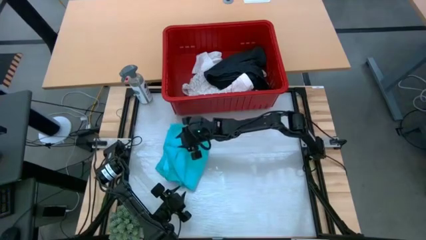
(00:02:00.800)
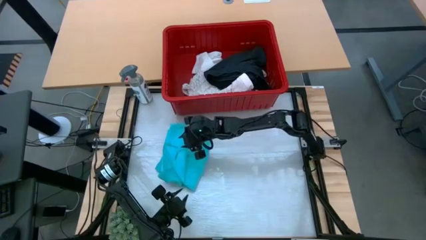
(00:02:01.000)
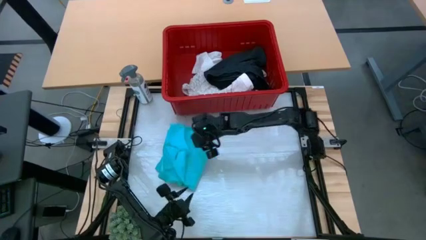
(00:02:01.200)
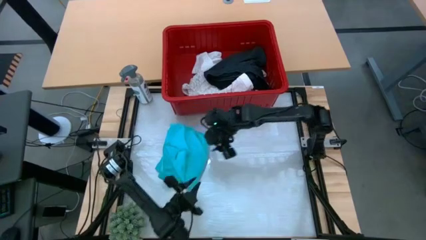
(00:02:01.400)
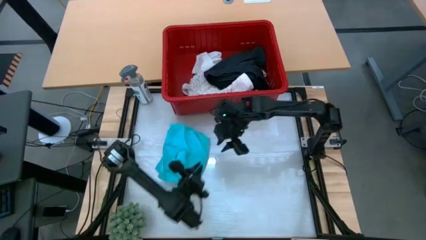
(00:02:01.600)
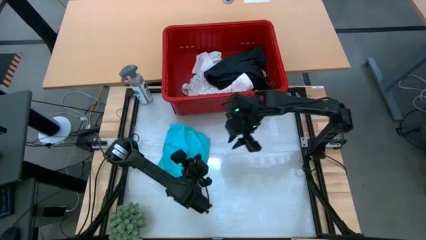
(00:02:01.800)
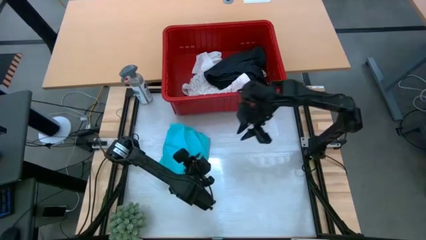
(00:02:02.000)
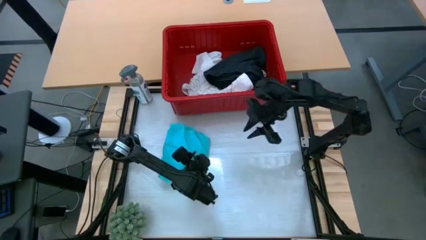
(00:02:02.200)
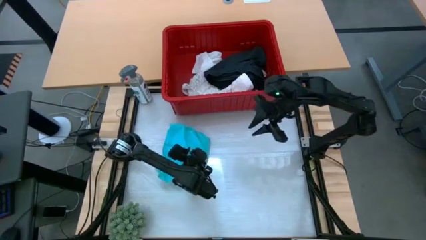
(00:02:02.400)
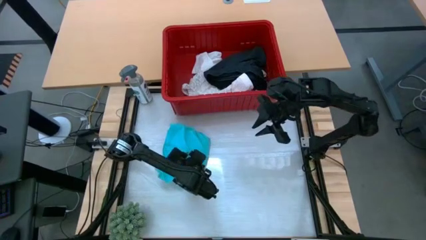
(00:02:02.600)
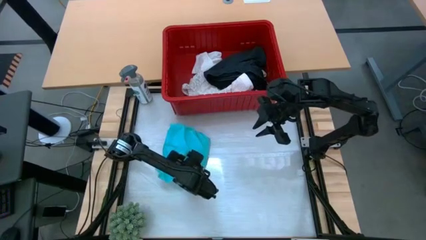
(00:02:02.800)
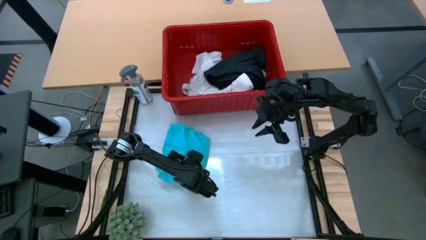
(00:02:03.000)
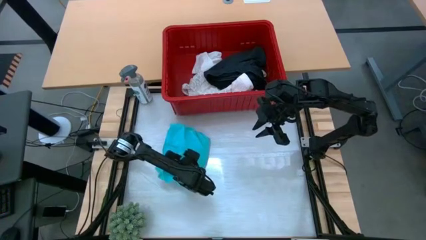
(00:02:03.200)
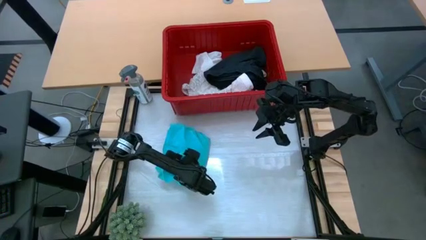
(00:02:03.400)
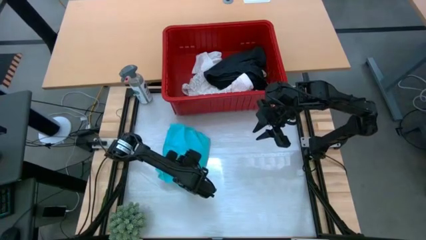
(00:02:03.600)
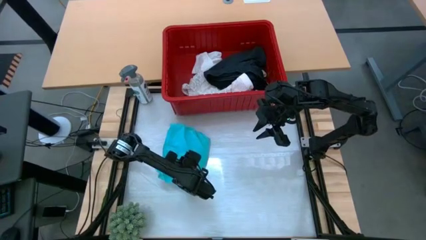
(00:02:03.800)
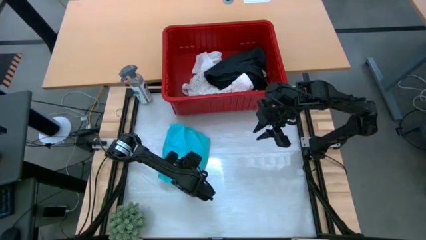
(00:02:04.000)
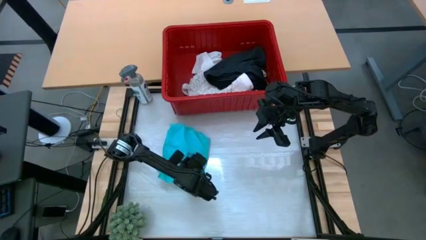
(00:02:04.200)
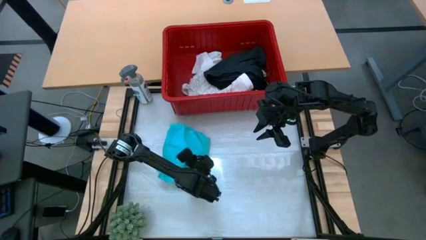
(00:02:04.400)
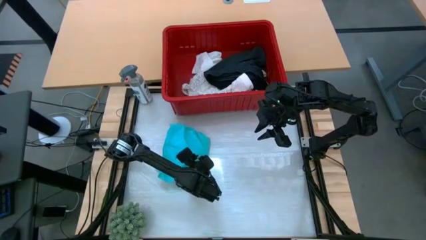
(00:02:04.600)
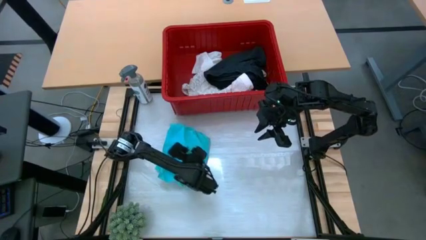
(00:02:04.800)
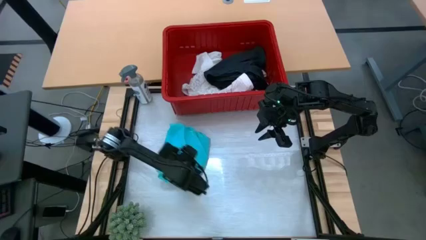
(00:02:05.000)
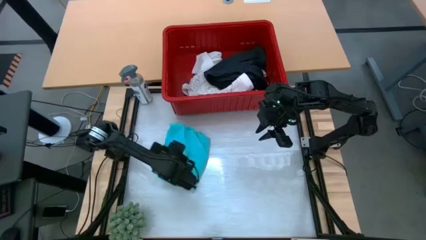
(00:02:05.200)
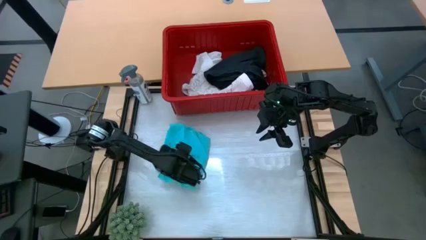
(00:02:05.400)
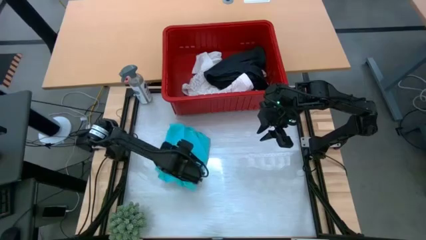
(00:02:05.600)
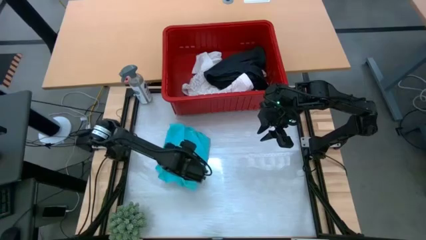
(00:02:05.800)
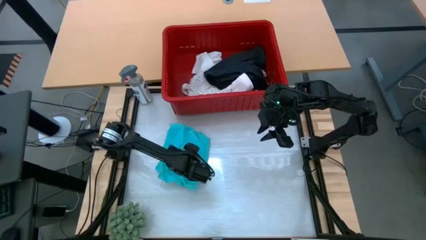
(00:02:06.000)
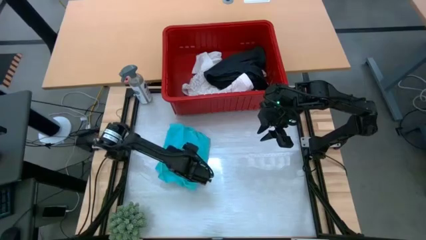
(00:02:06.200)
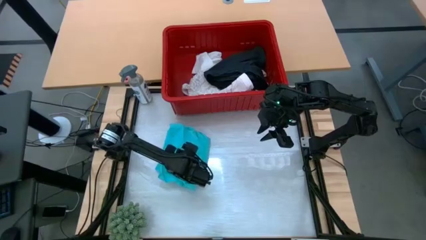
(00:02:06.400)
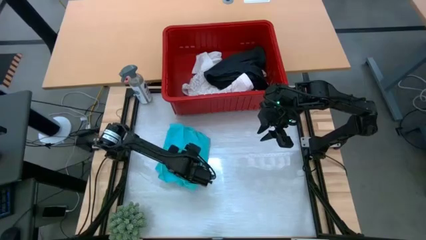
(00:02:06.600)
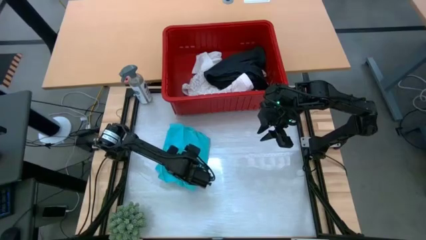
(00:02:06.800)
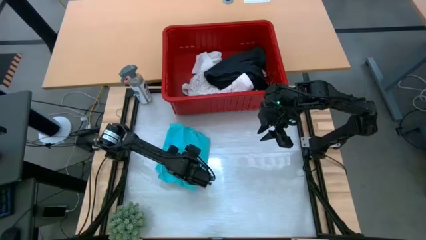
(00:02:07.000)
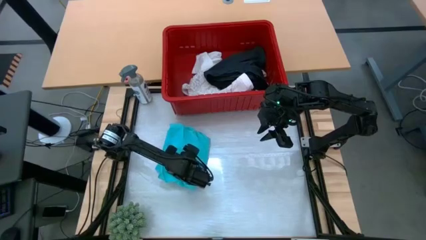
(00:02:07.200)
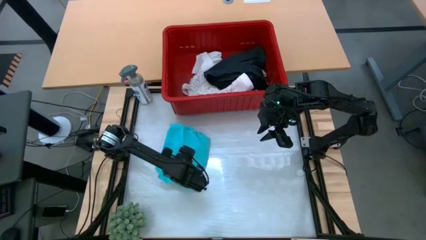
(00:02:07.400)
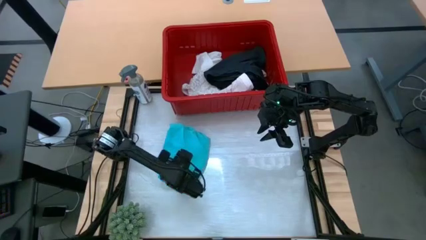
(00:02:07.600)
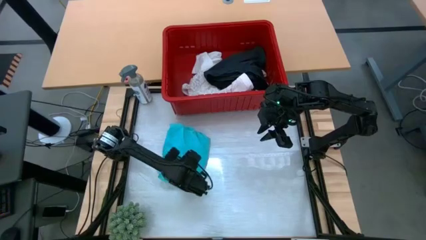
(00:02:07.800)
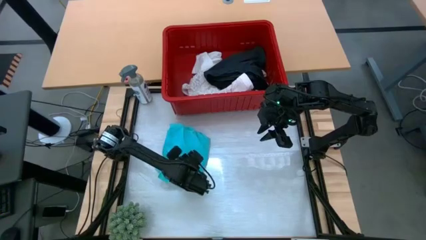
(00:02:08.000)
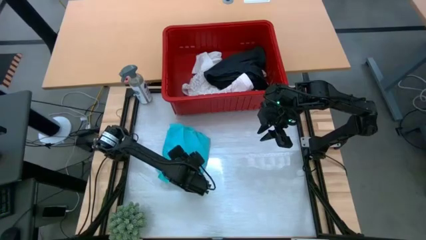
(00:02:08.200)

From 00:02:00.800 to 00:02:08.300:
Task: Fold laundry
Fold the light blue shorts

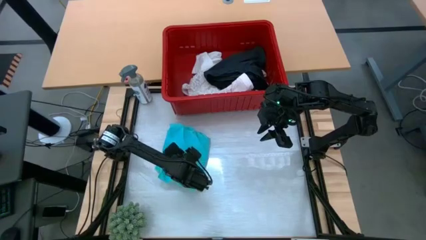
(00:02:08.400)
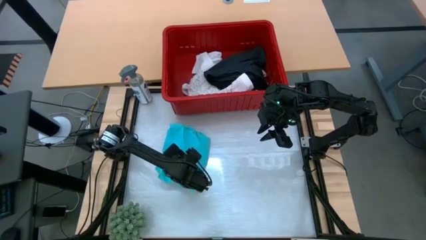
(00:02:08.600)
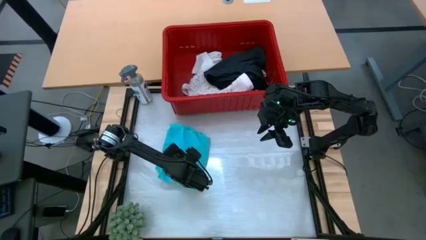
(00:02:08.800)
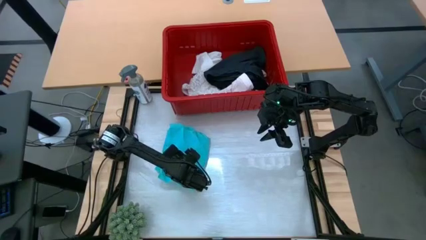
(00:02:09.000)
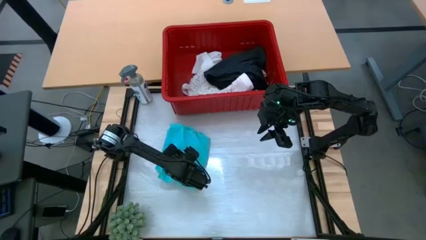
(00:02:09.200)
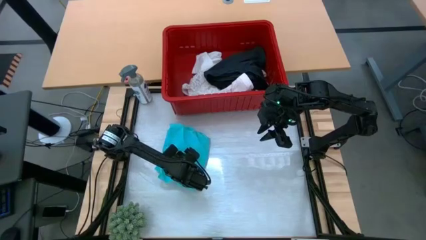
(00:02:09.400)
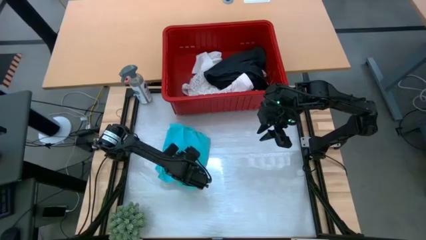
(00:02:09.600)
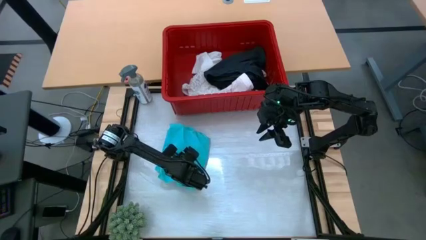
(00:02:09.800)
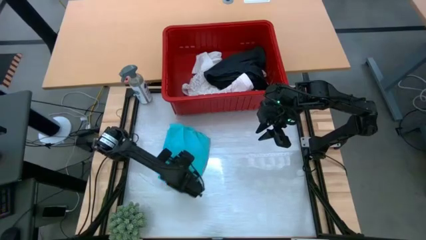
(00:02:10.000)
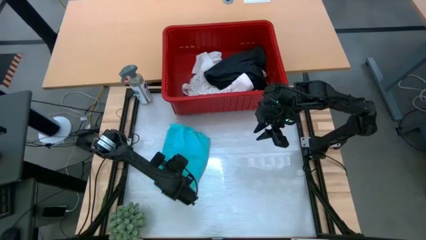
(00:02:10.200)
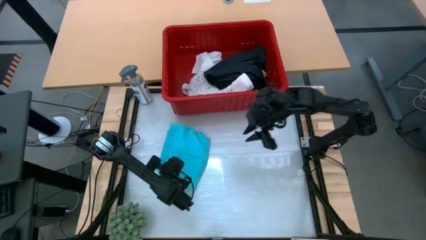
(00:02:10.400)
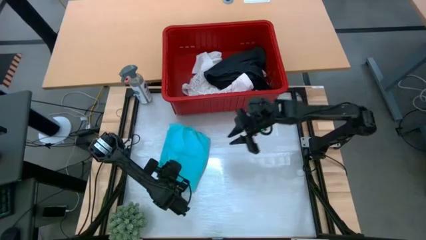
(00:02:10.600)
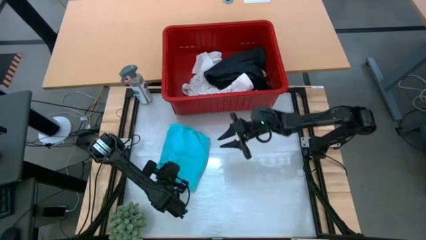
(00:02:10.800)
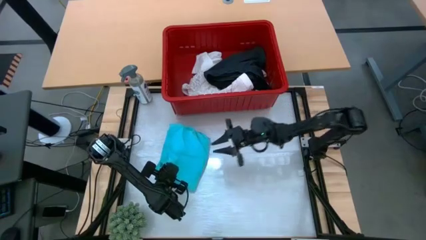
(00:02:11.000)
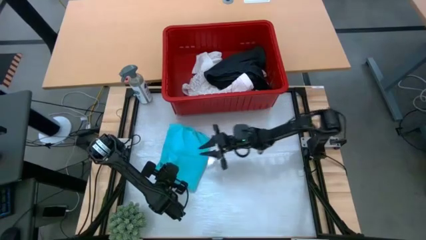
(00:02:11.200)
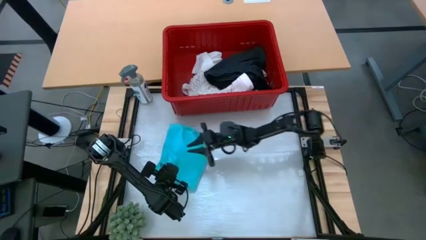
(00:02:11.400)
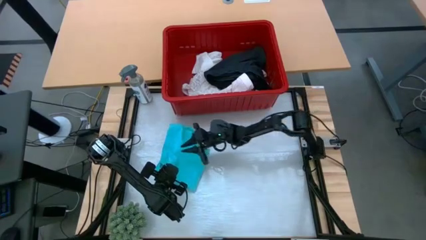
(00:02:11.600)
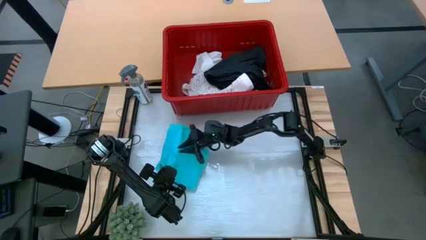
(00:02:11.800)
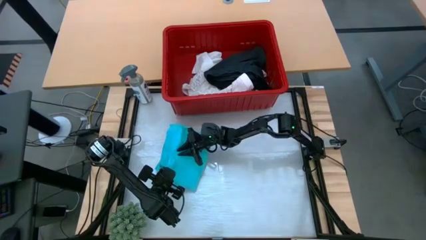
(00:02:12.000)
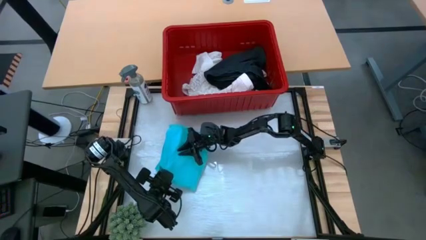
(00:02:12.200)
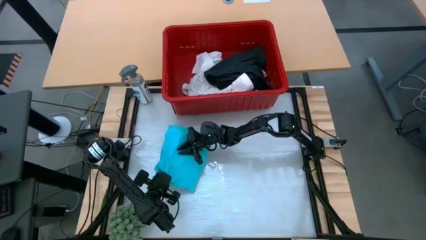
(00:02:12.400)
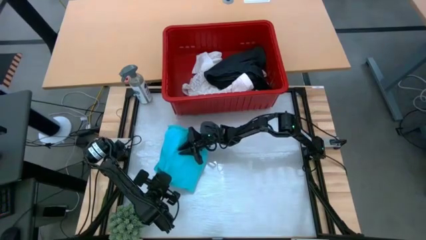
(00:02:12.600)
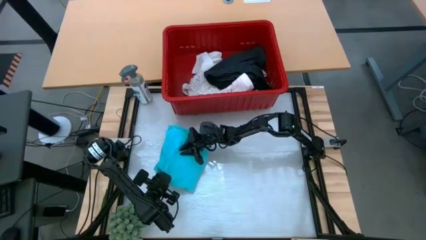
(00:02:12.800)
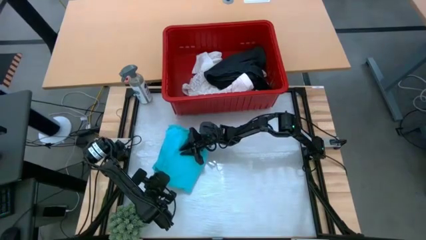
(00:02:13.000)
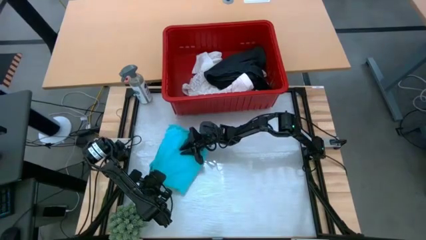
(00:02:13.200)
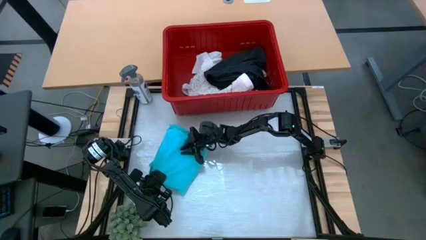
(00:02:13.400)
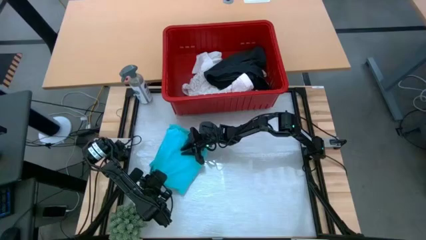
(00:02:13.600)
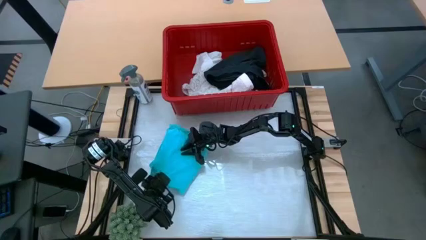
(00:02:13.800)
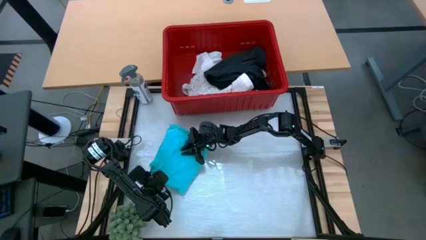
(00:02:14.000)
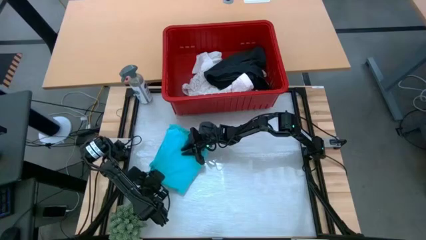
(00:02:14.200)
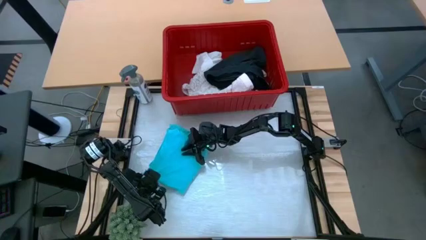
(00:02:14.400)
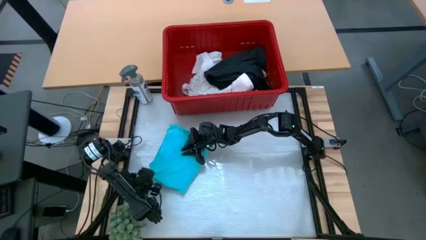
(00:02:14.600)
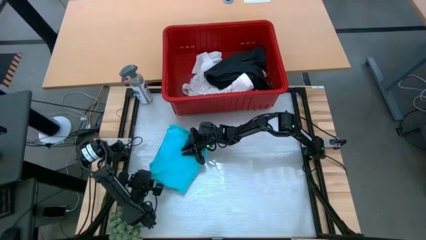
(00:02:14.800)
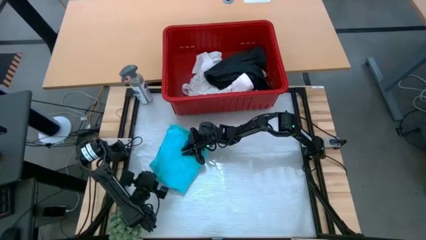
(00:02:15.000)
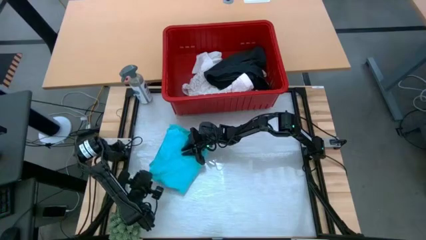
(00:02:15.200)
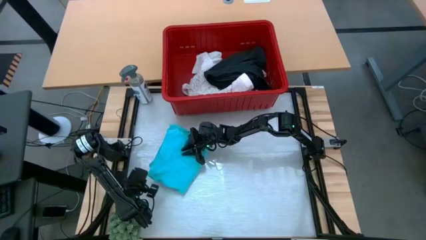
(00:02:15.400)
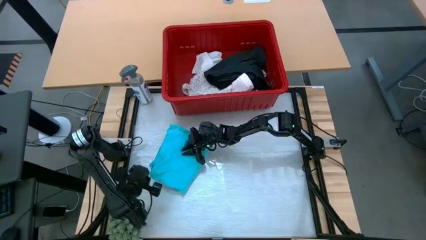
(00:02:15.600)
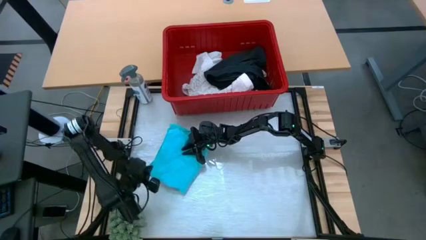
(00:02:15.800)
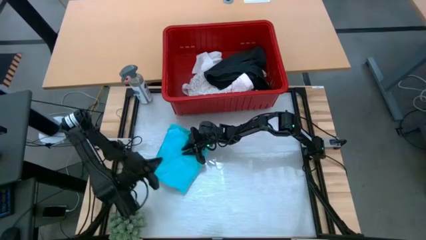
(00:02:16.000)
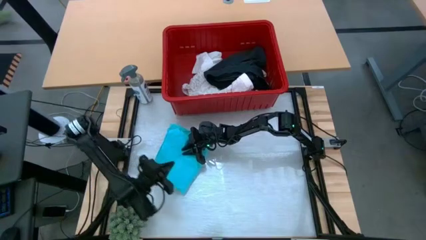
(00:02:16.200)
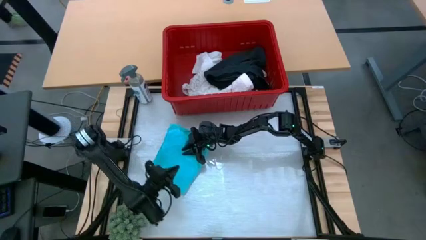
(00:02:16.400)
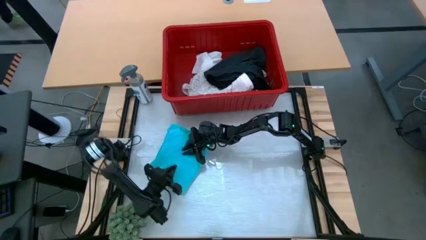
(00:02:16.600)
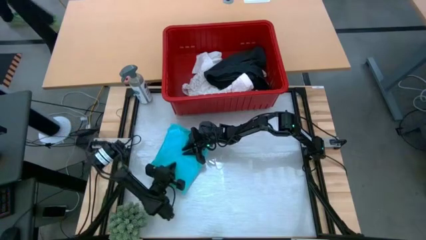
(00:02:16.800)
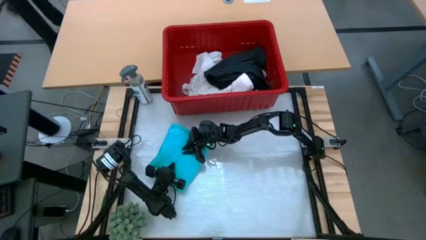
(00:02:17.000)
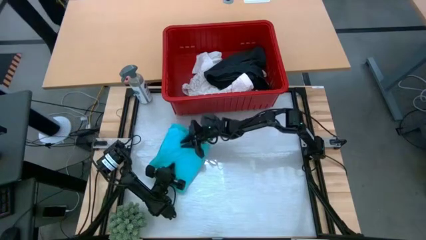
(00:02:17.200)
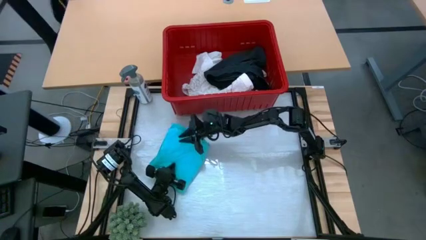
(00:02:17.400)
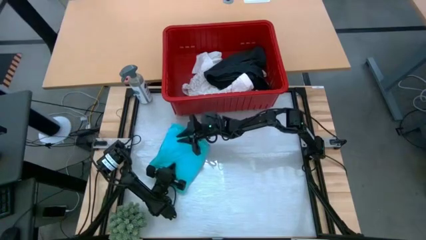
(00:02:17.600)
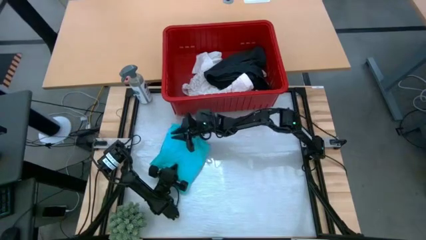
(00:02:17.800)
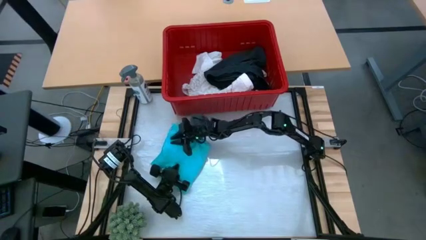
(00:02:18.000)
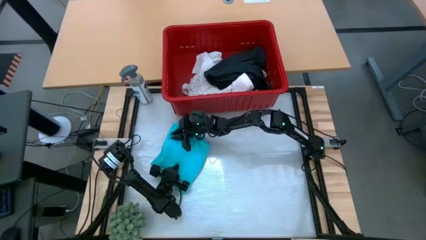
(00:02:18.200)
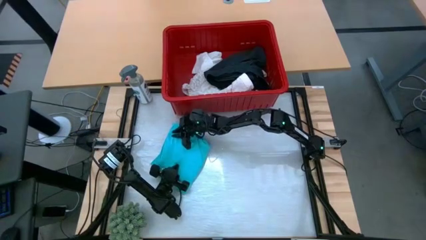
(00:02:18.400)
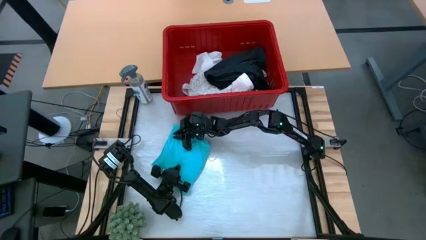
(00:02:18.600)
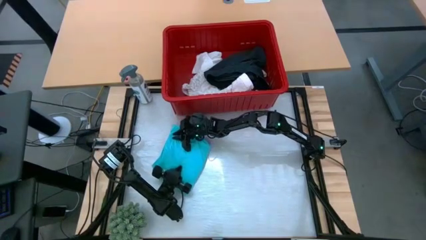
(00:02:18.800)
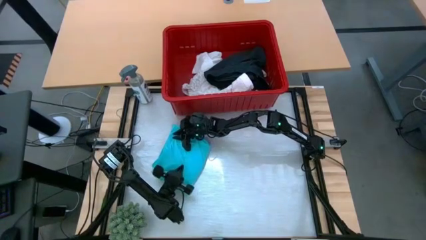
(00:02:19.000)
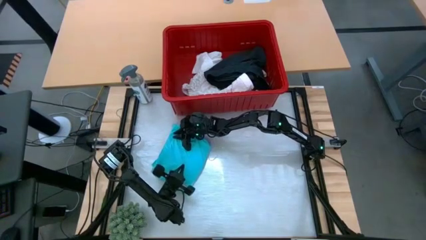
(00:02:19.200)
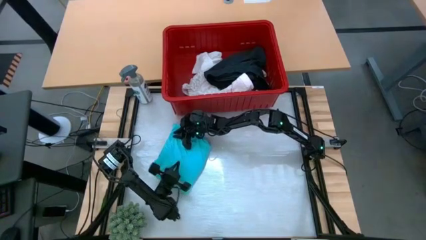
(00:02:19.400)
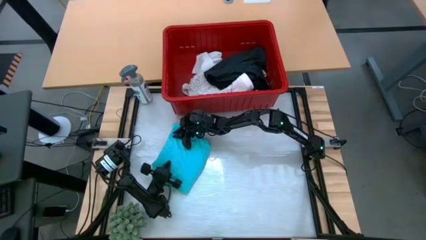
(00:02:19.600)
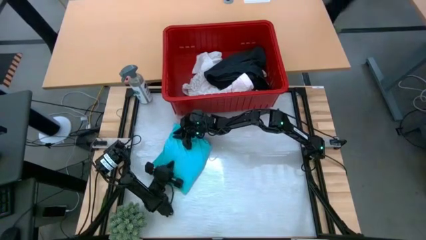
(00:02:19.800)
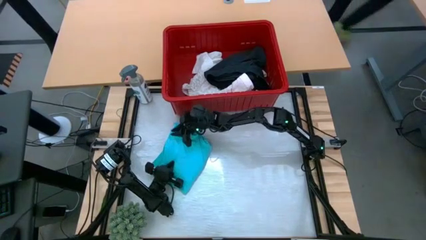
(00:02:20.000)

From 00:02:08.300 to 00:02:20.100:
Fold the light blue shorts
